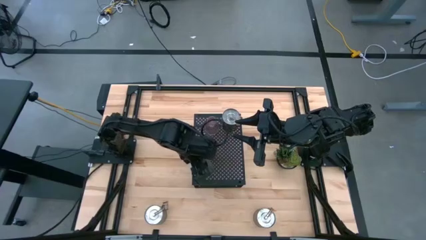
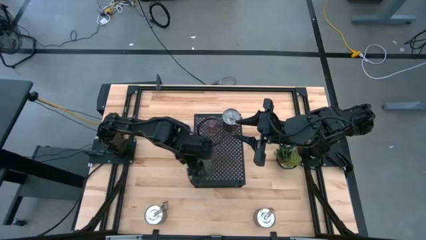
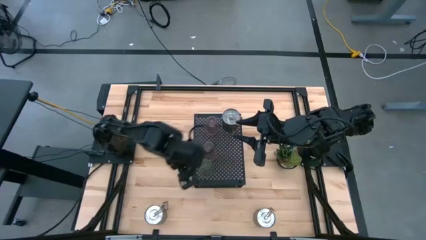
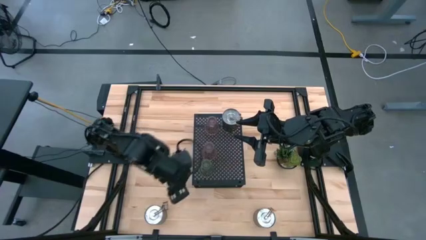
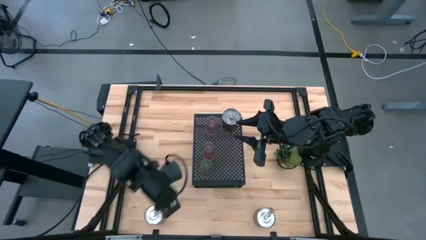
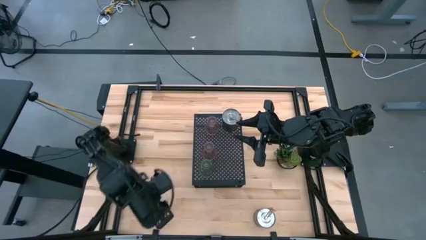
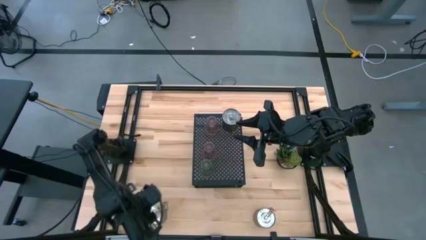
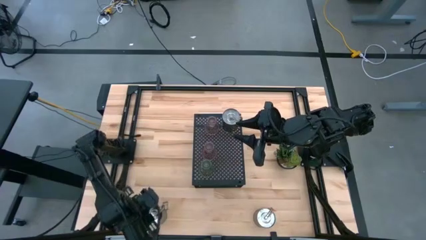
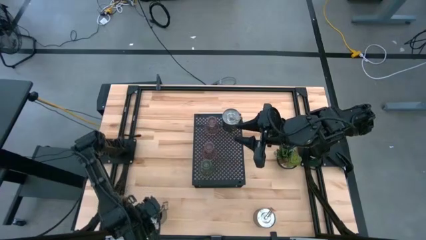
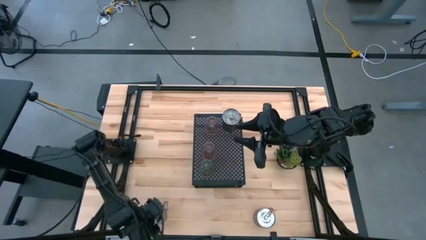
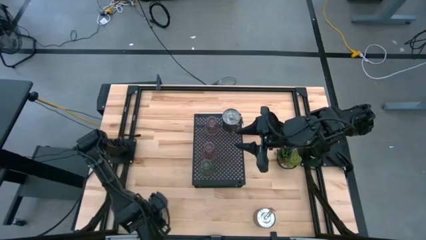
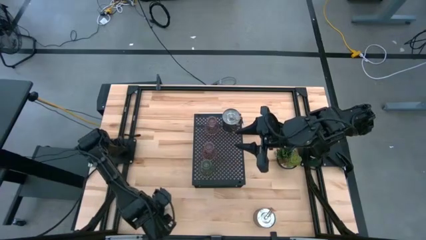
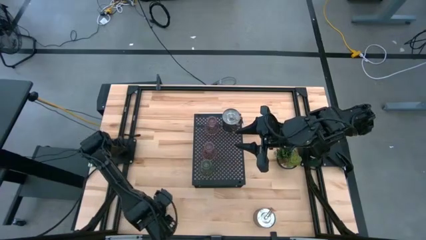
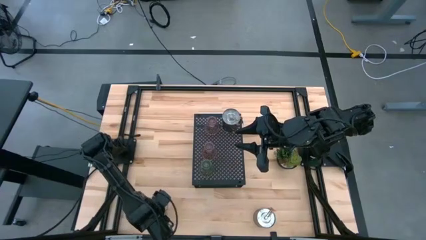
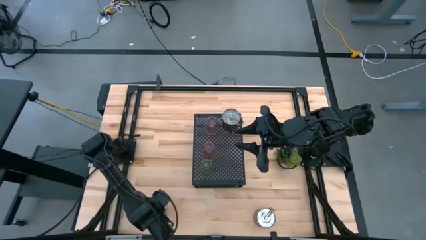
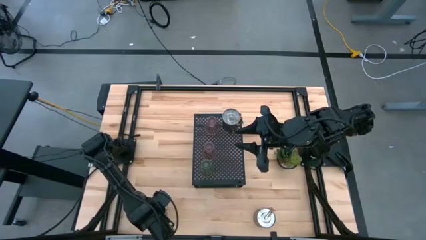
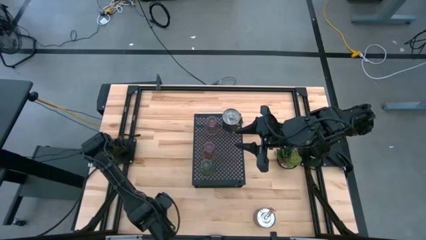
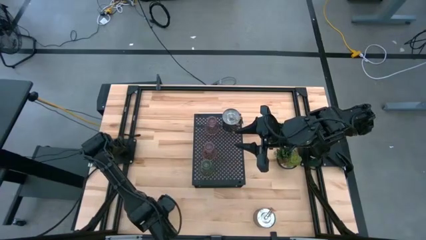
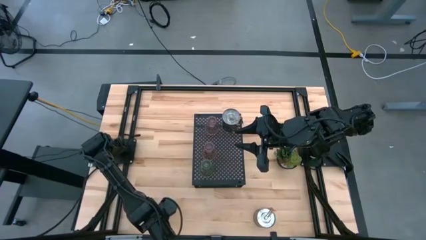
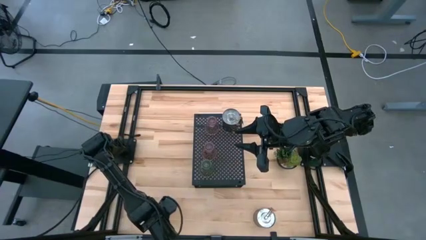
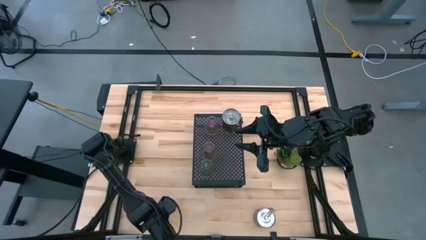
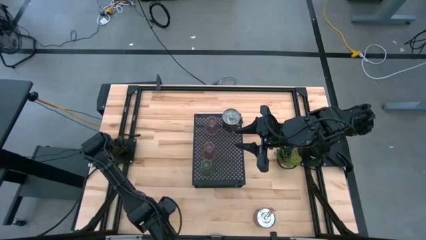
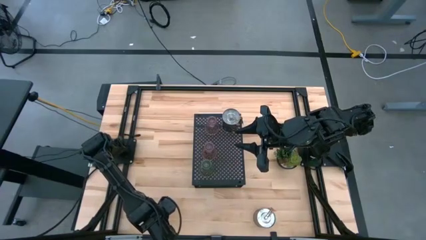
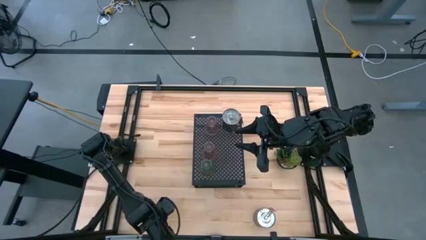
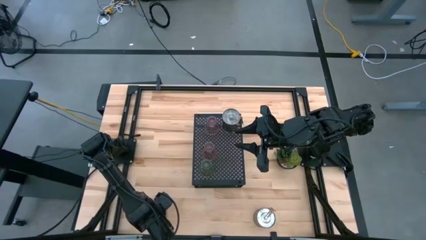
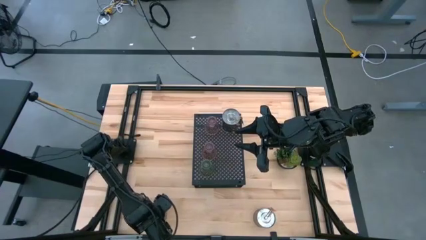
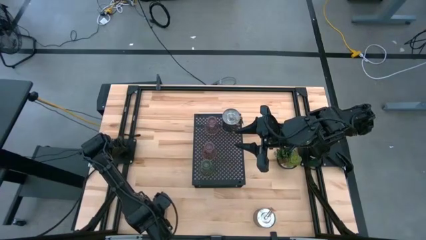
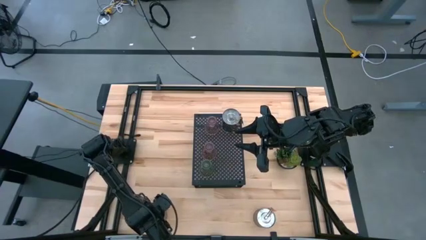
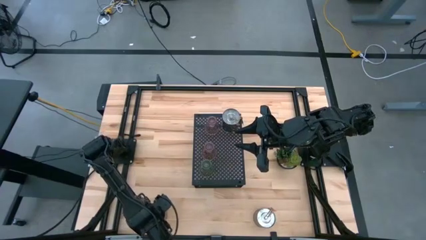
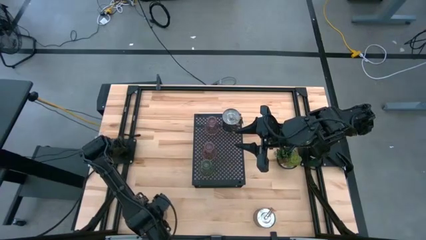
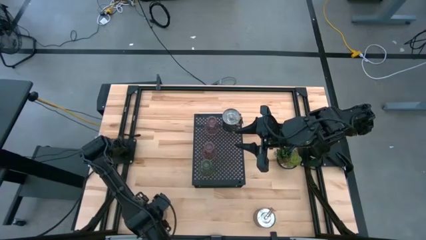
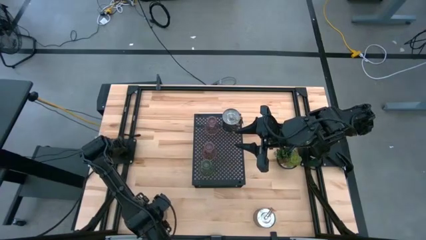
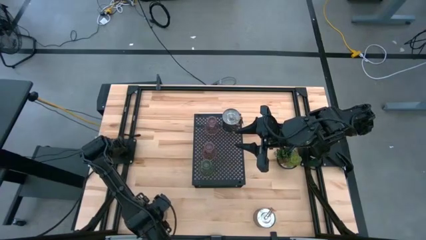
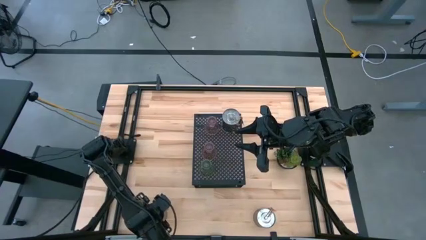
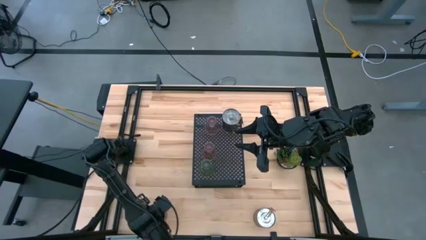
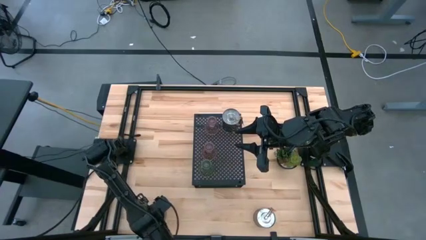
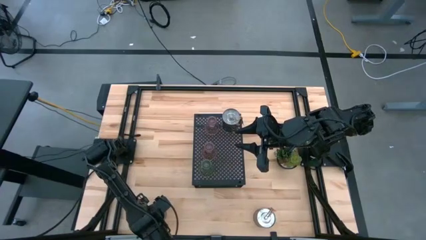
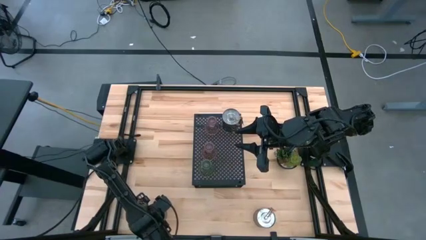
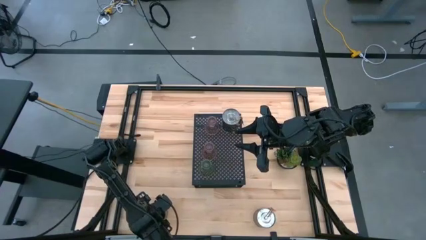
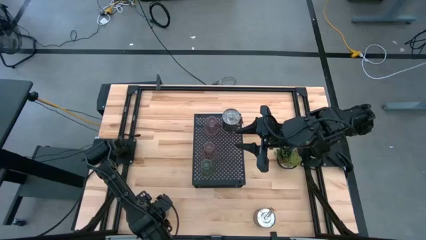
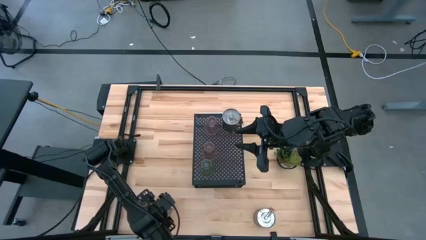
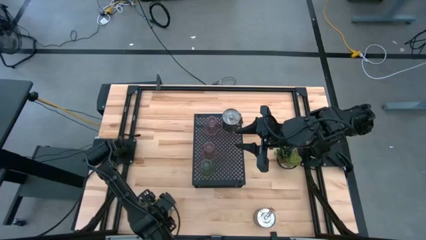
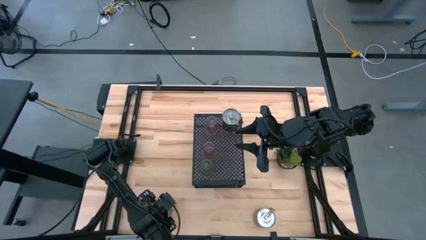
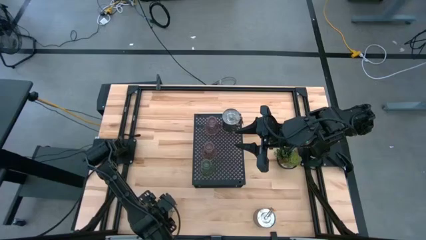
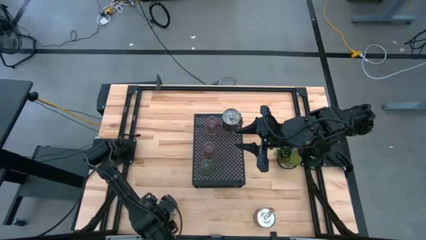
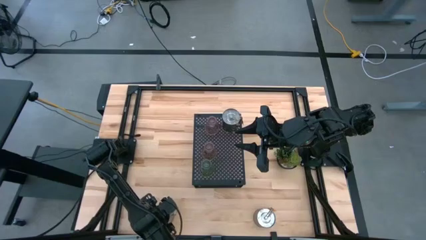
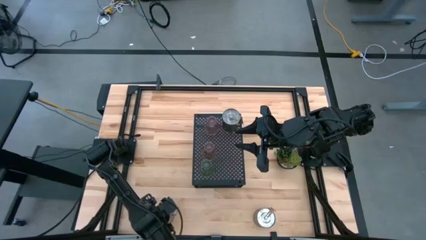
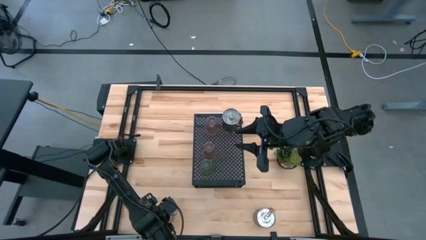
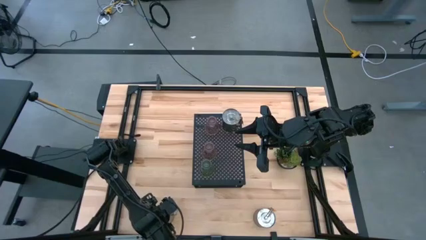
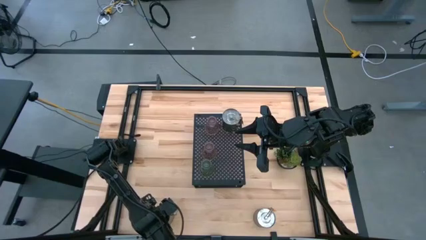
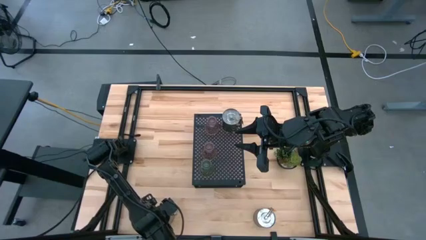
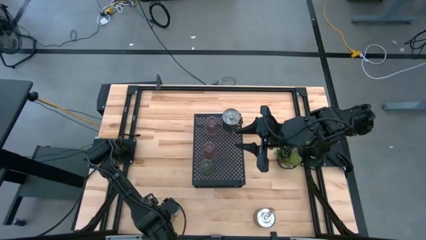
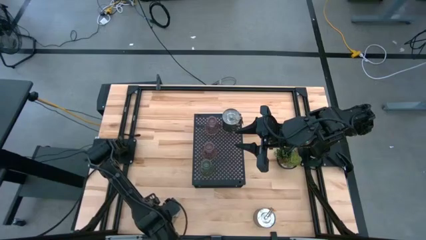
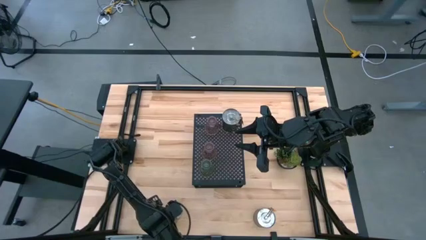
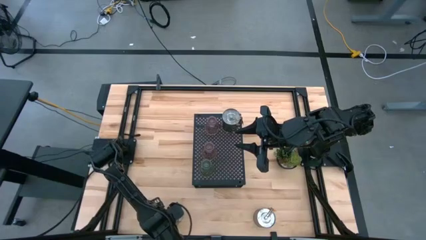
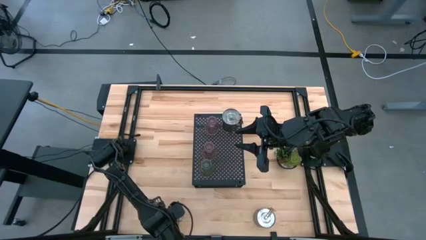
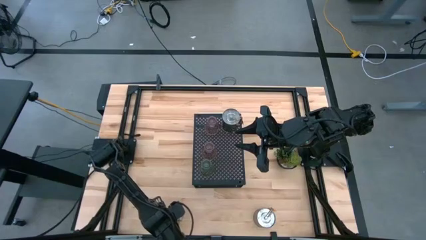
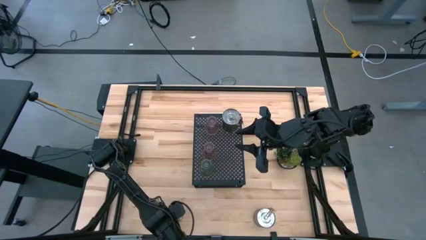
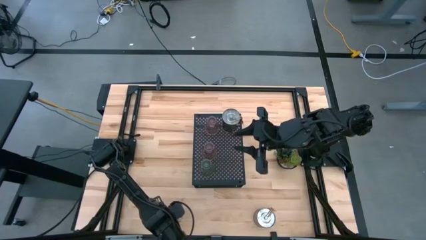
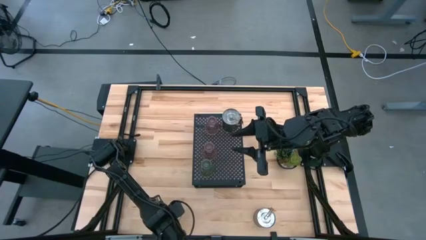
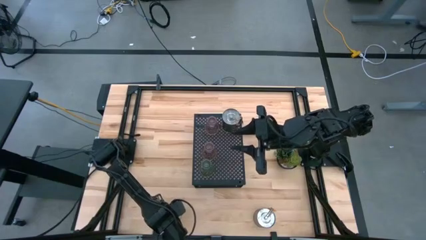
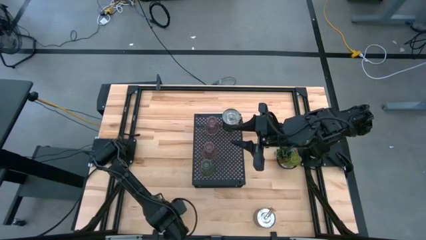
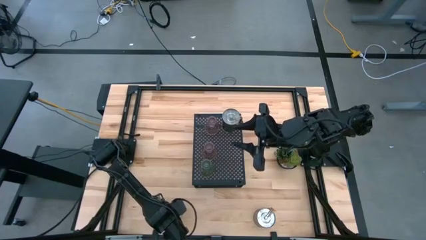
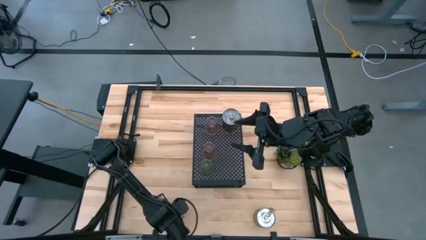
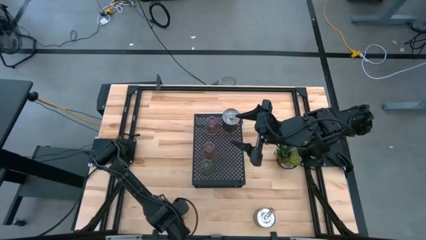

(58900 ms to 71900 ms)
Task: Pick & Place candle stick holders
Put the brown scented candle on the shelf

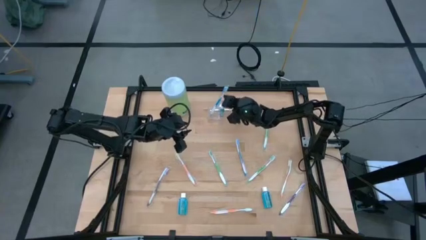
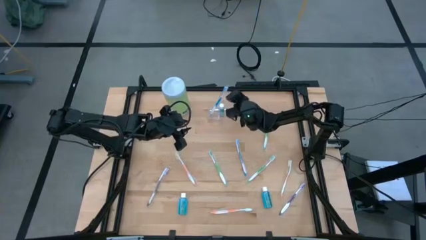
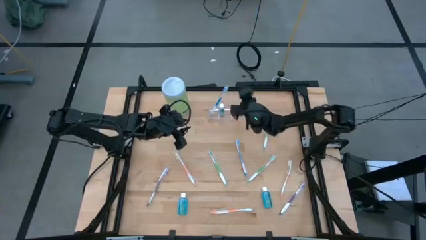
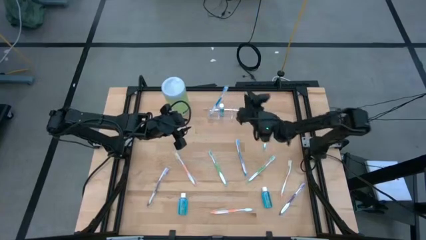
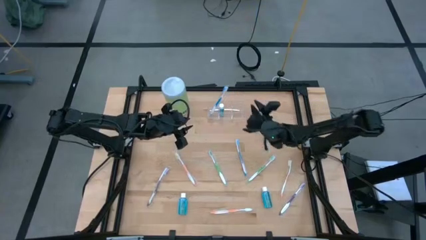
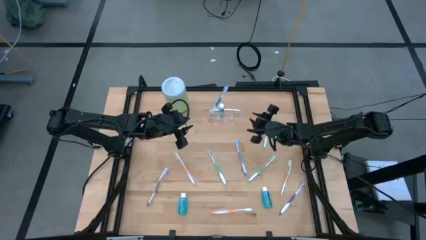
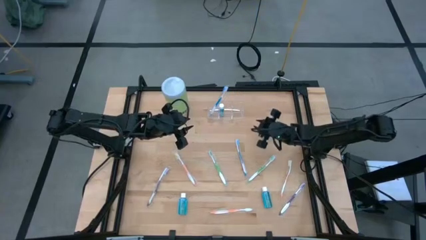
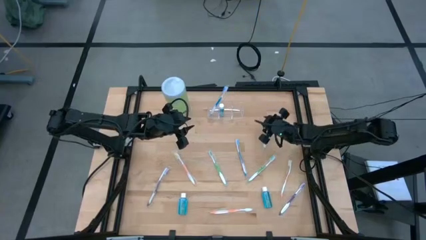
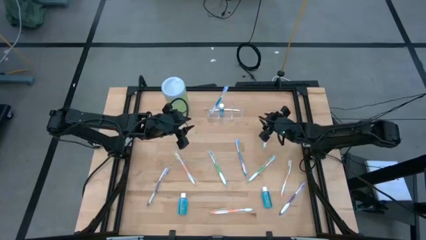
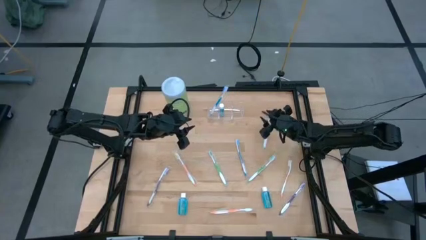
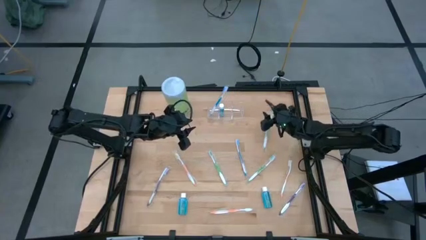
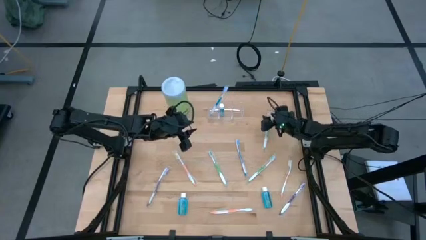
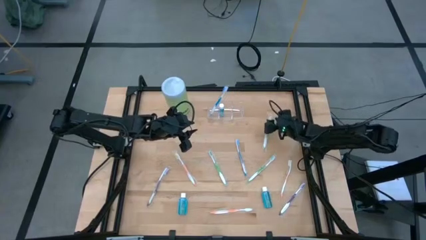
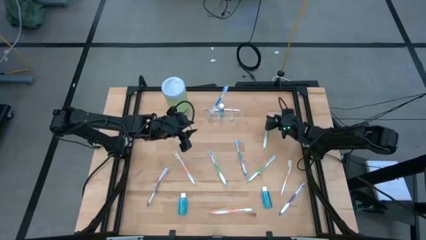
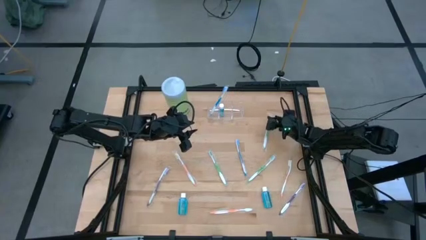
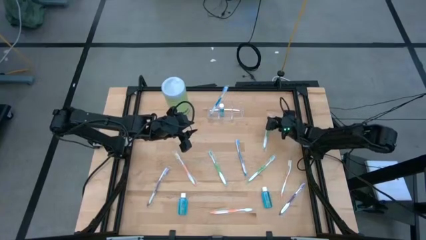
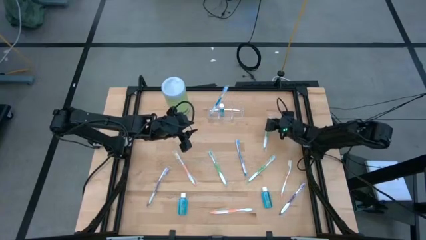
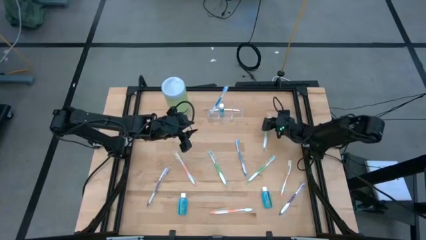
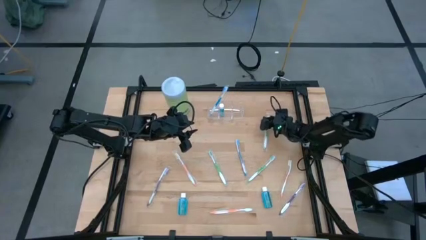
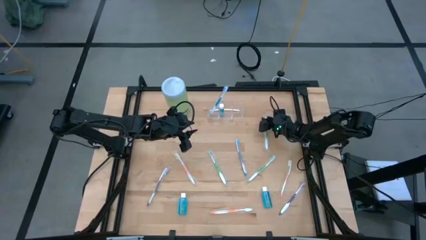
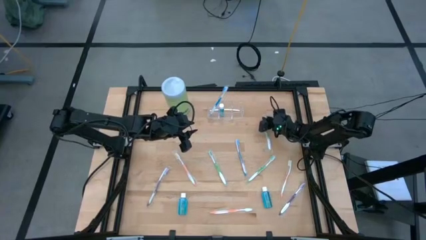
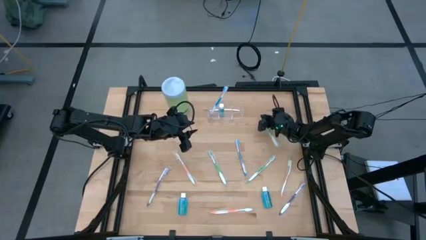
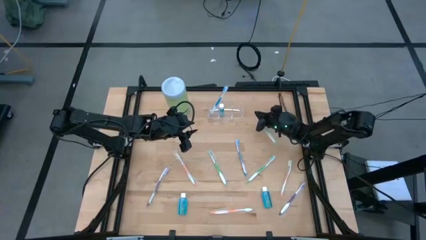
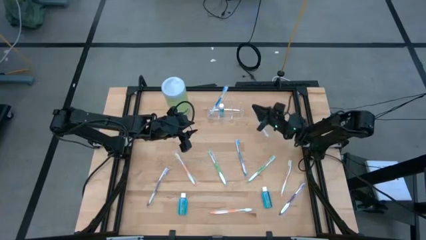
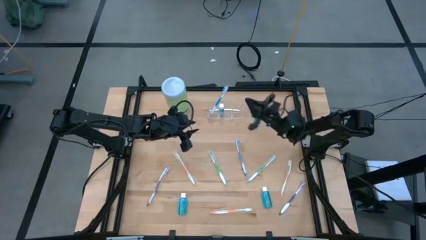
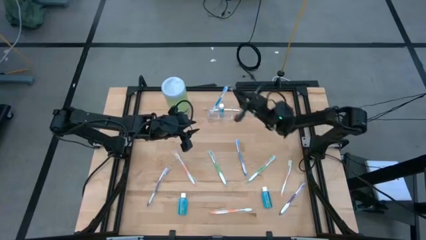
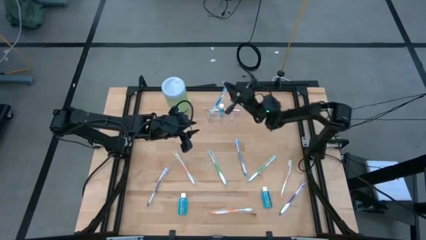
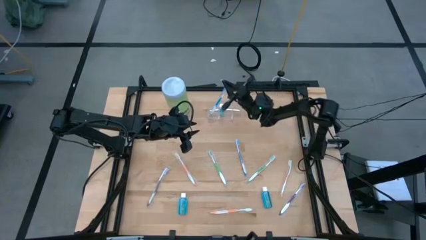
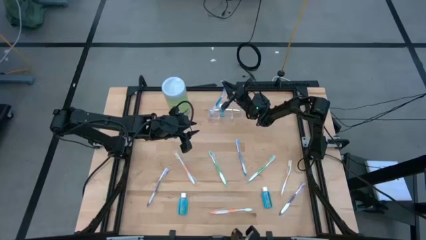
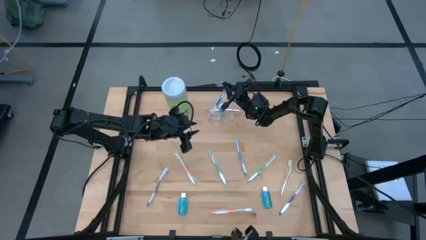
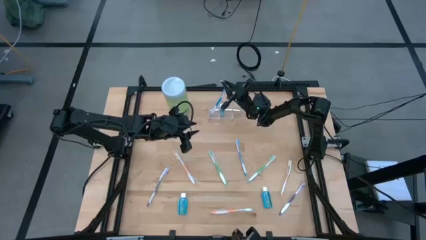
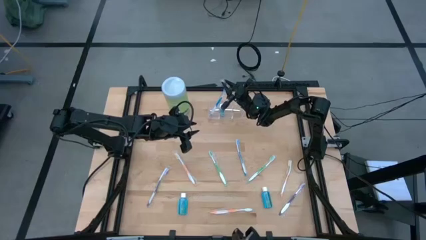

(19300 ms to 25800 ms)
Task: Pick & Place toothbrushing station
Put the top right green toothbrush into the transparent organizer
